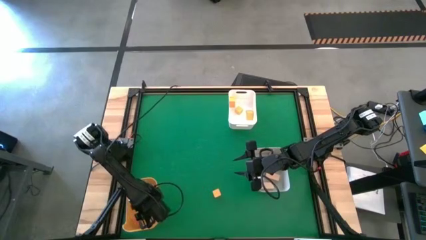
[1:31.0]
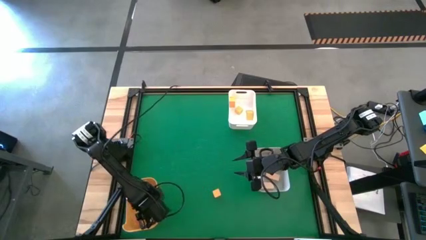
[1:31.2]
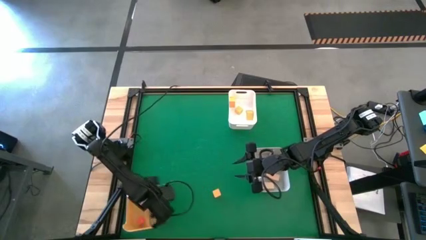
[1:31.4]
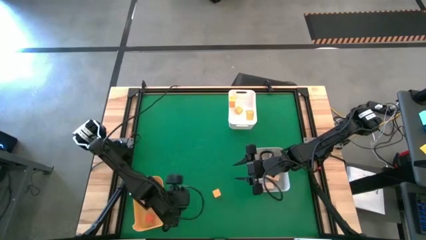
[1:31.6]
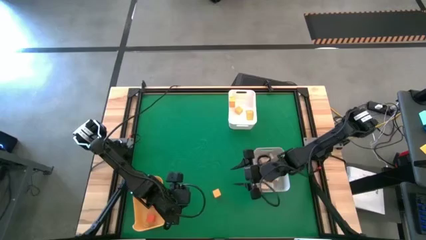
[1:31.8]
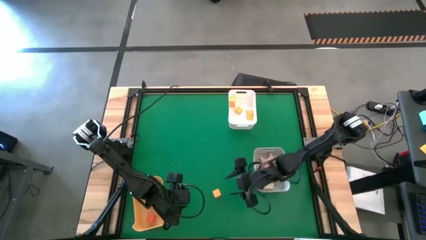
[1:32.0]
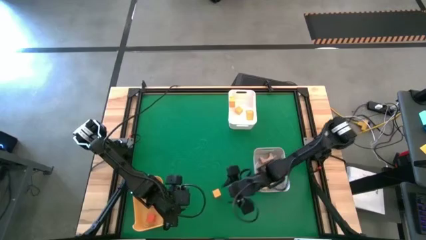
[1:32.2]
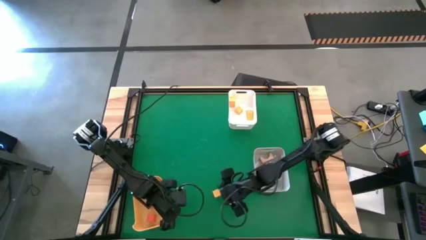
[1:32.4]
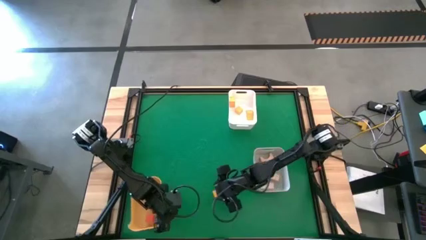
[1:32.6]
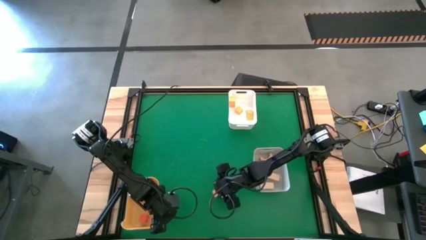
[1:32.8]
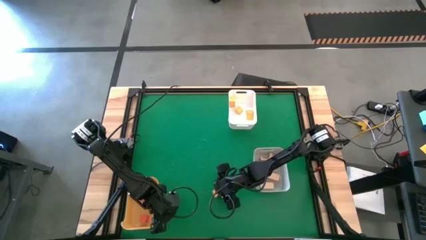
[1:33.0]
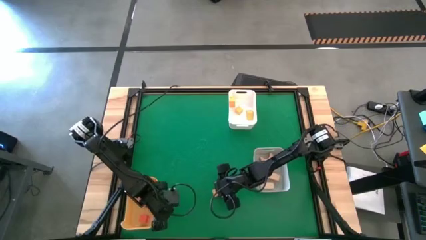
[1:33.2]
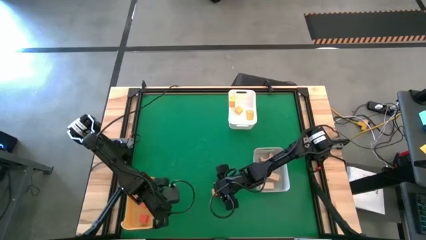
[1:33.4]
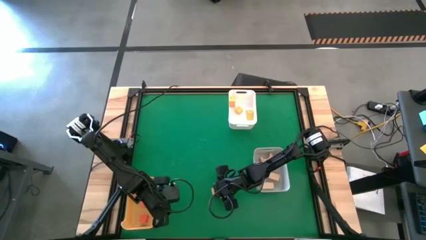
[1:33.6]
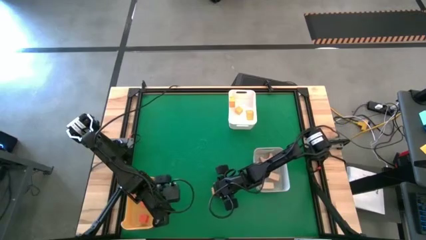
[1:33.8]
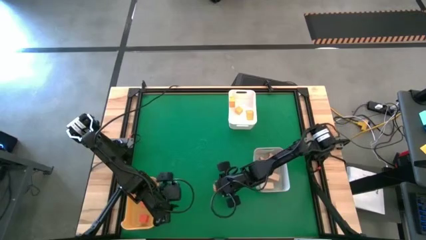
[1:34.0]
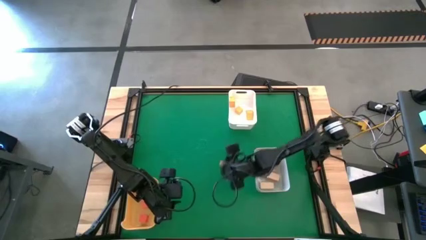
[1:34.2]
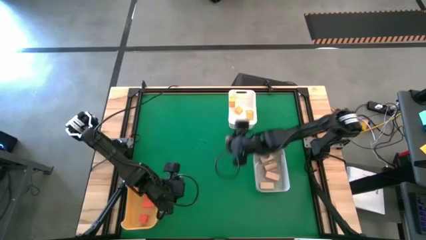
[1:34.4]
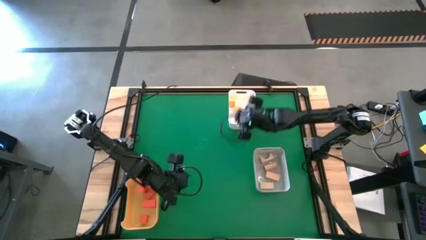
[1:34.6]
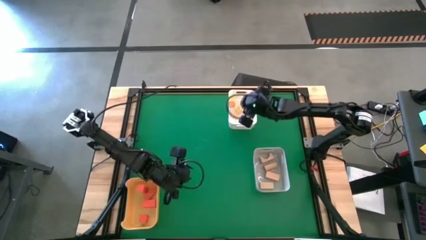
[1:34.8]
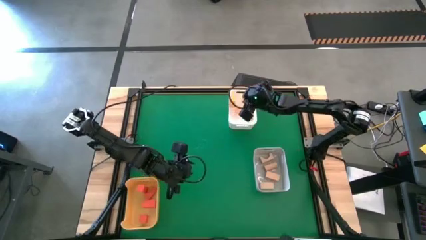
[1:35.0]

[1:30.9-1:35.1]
Task: Sort & place blocks by color
Put the yellow block into the white bin

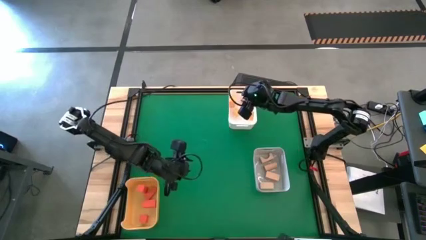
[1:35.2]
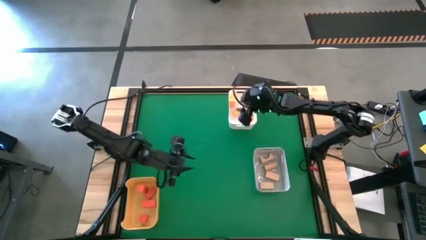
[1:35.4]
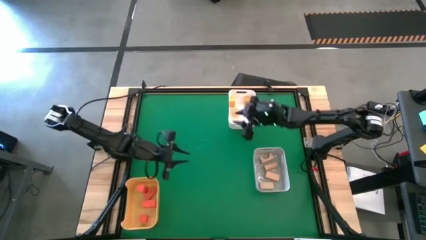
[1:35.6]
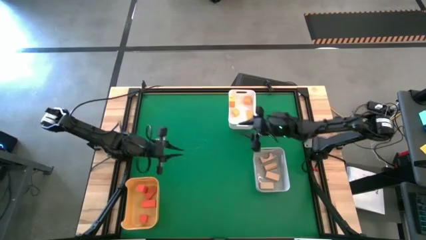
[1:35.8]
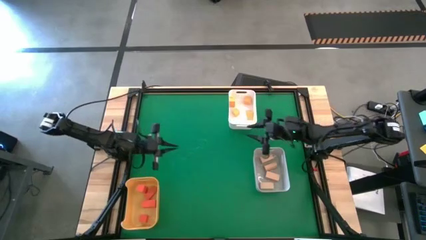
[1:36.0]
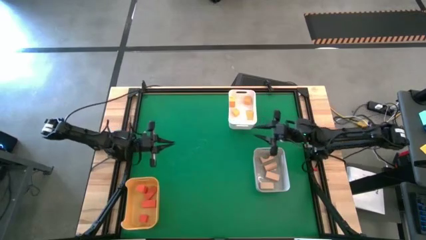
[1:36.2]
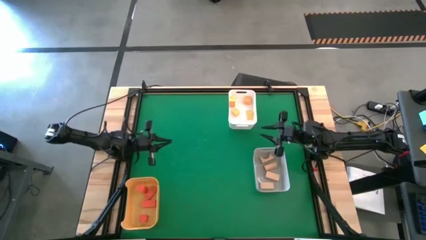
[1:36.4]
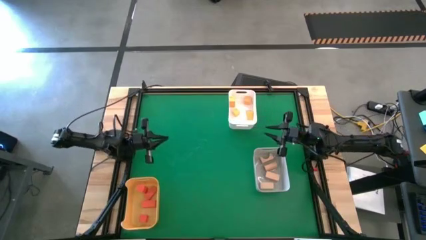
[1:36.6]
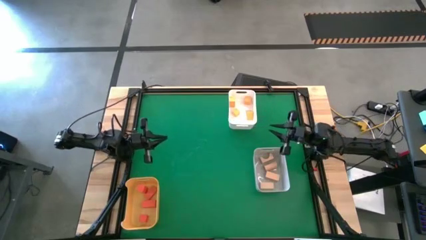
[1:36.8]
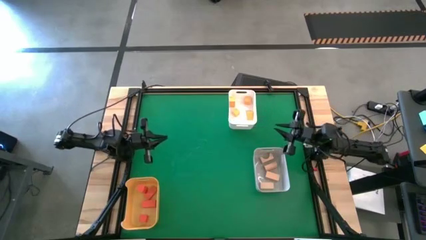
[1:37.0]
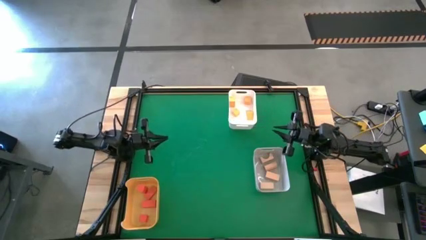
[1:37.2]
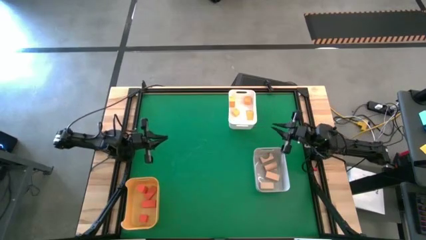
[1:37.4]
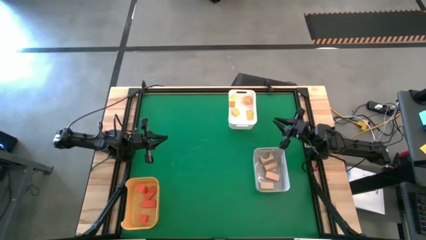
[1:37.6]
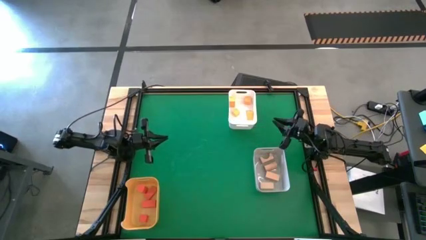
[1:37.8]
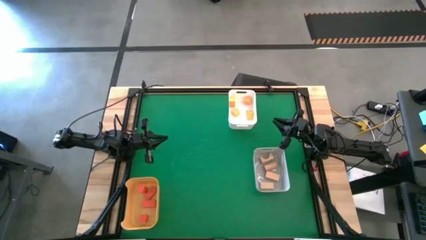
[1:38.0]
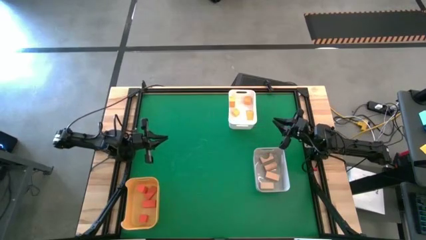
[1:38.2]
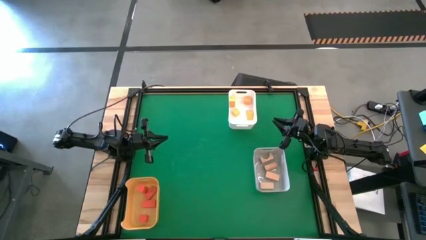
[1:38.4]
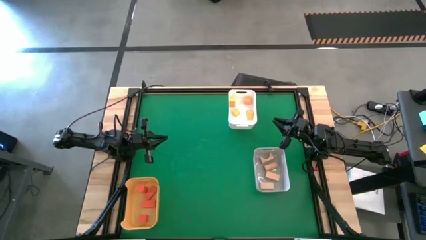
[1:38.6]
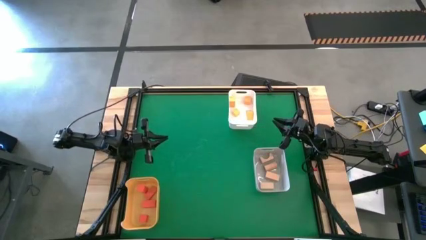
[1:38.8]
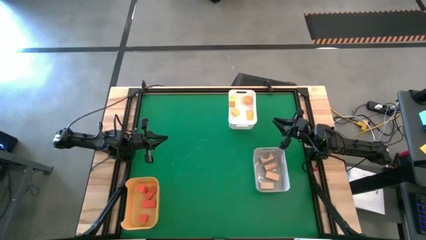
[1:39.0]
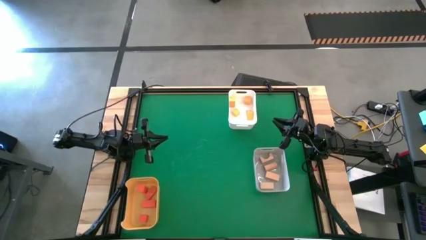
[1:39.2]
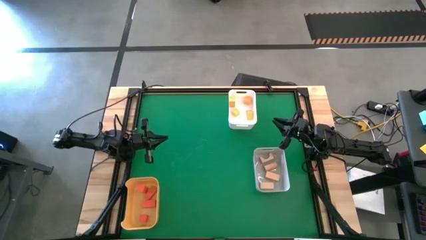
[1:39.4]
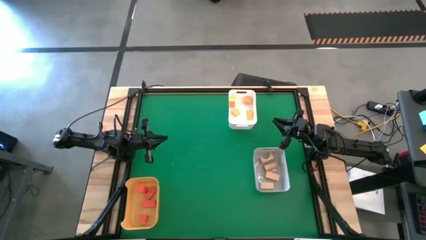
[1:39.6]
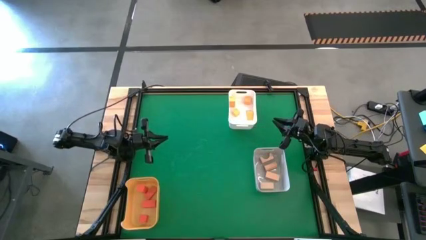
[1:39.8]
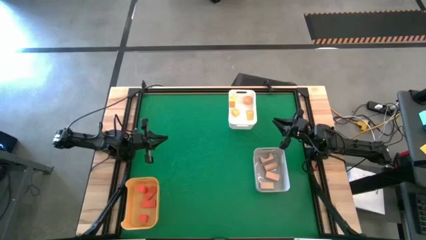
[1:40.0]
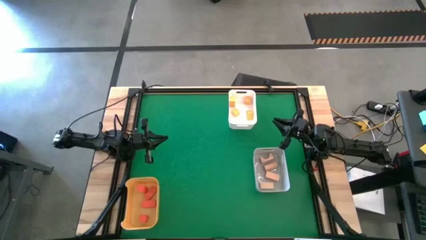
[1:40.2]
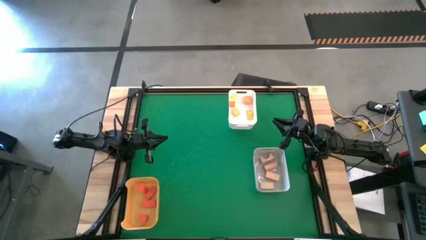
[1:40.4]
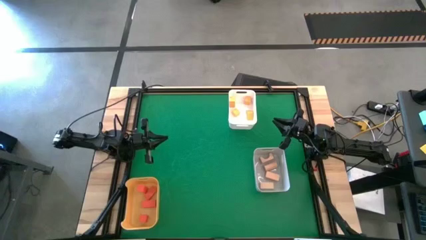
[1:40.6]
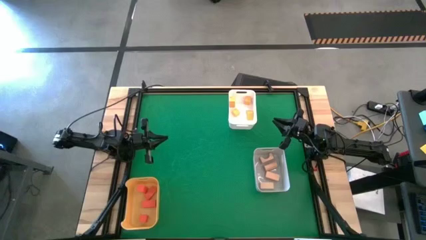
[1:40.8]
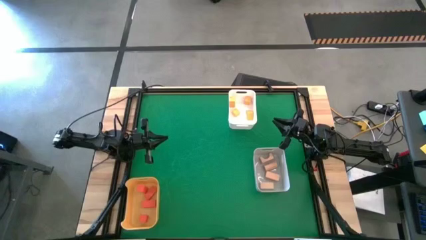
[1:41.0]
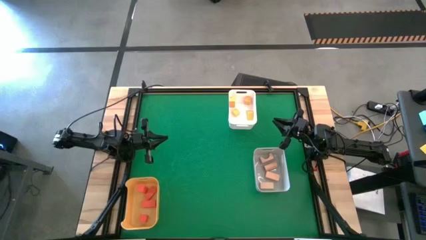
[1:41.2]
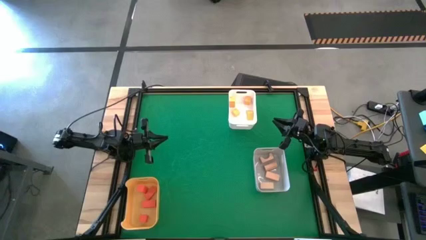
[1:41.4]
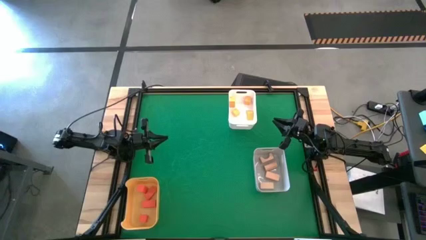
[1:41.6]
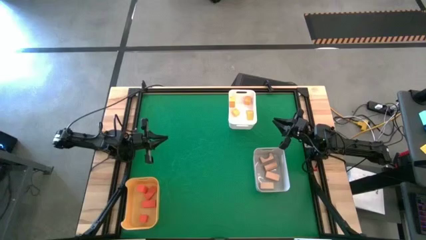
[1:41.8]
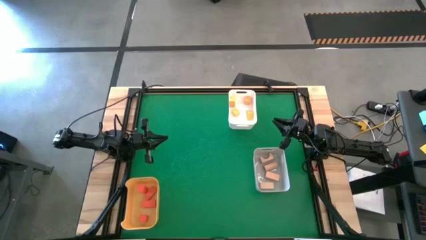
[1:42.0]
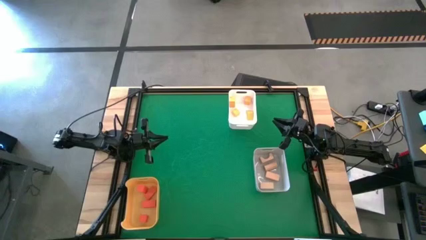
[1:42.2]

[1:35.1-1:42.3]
Return to Home Position

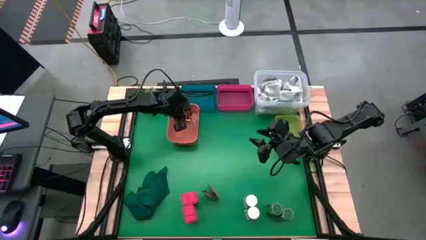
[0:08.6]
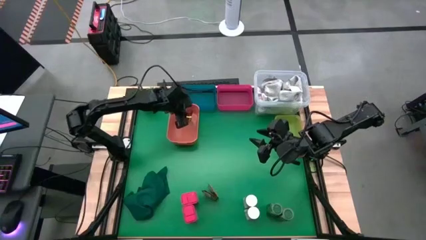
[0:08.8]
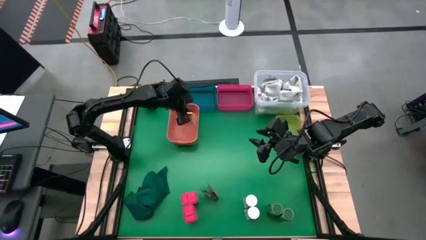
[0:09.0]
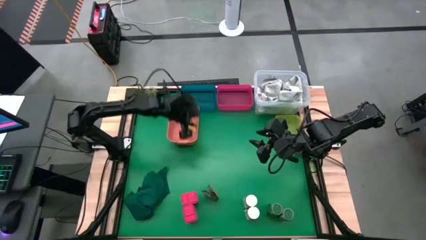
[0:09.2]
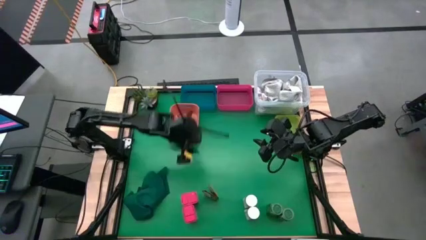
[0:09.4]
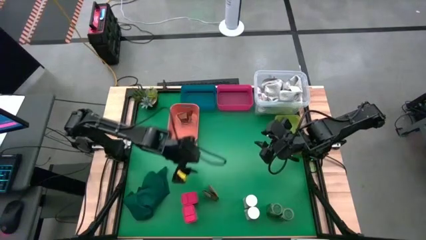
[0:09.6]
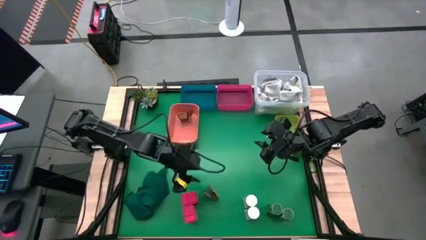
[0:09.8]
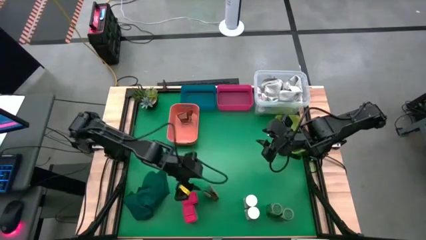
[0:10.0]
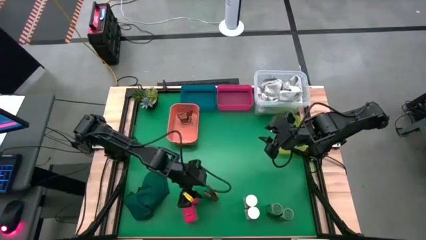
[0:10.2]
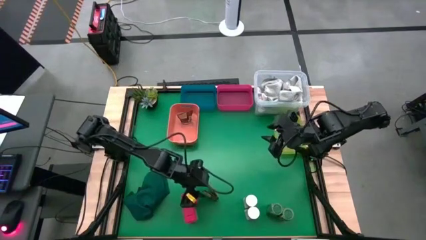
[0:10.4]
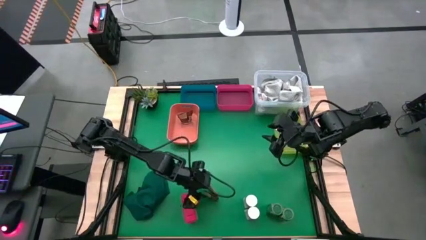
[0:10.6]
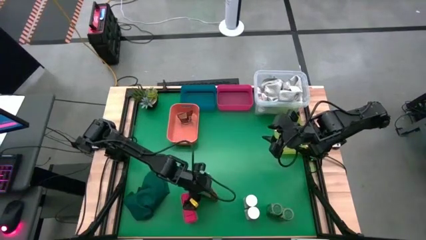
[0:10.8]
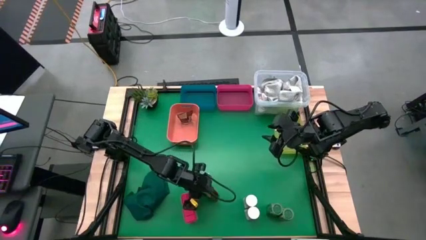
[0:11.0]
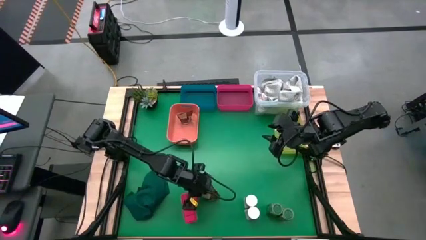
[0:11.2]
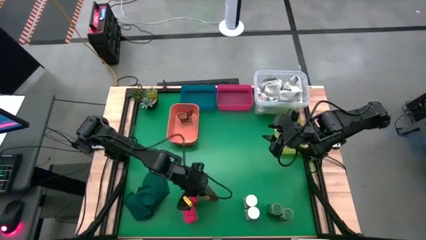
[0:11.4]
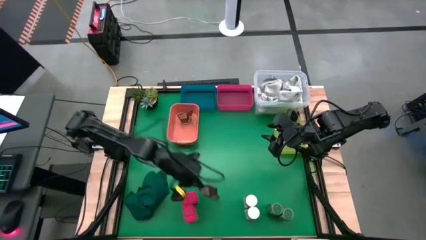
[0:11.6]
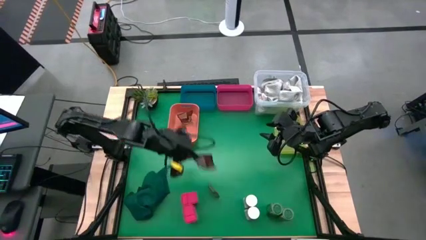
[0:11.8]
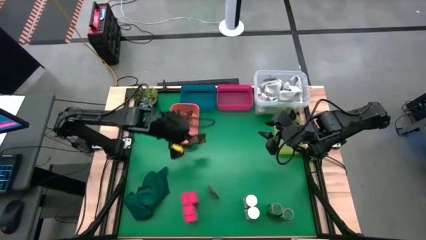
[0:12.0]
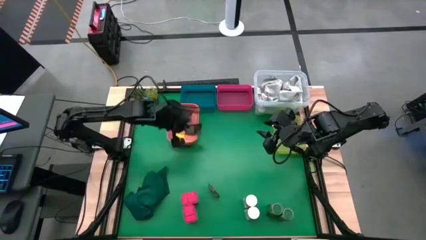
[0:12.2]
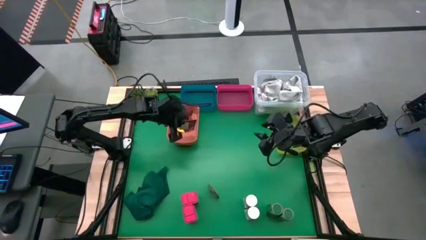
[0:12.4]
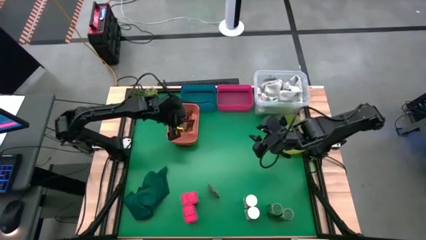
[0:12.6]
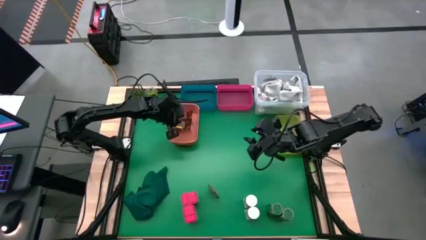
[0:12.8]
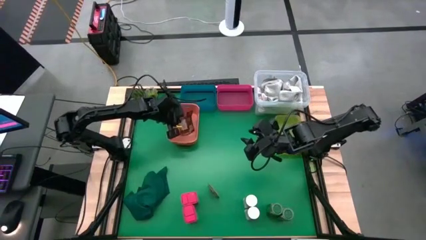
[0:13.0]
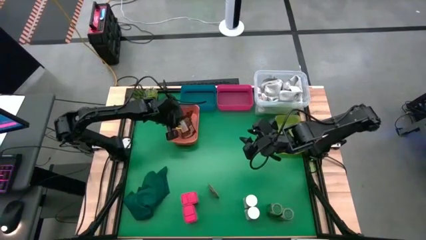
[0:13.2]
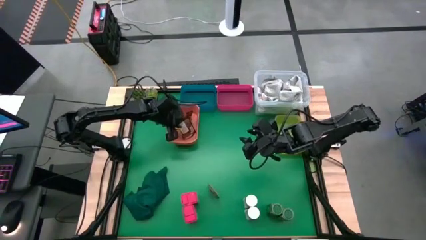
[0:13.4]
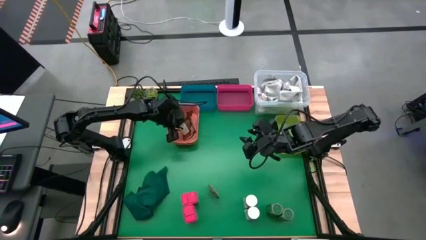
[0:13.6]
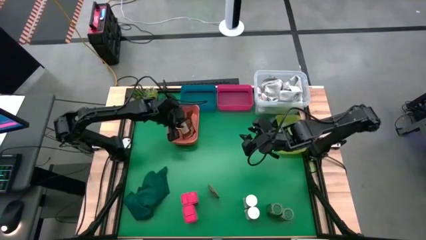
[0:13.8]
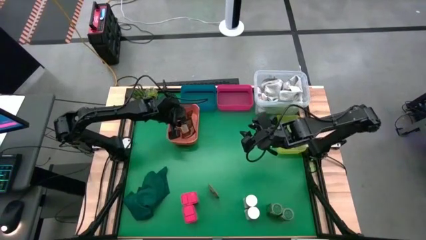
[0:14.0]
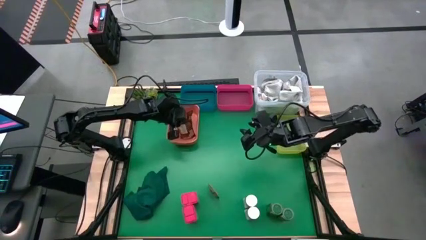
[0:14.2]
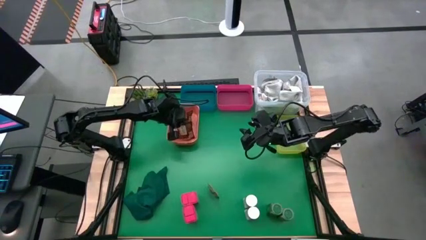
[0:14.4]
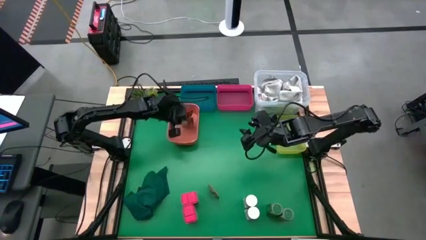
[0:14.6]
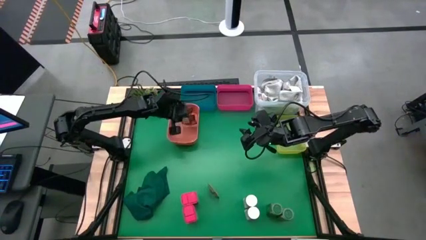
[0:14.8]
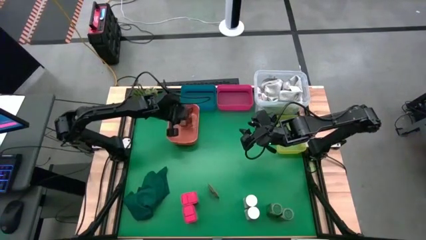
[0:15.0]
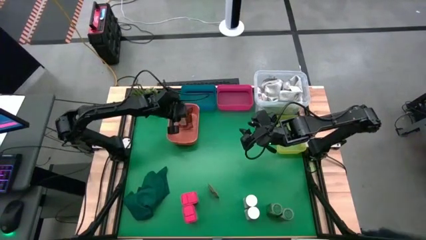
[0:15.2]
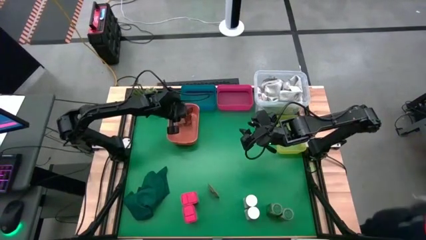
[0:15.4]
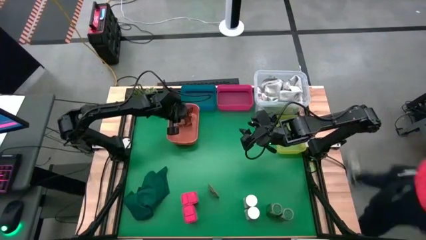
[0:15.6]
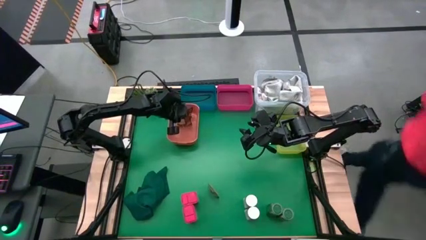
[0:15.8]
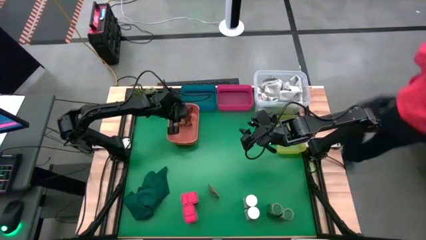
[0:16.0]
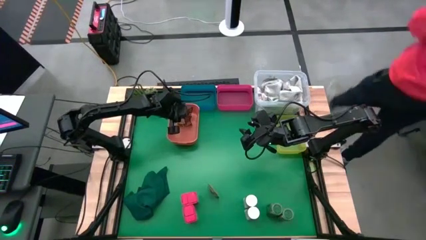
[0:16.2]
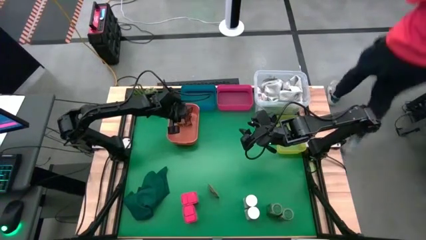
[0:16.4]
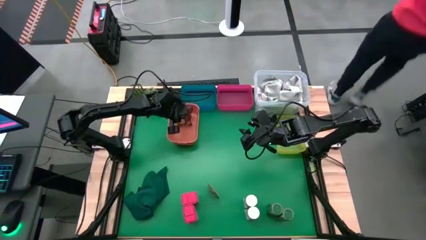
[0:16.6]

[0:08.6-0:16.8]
Task: Sort spices by type
Put the left brown spice bag into the orange bin
